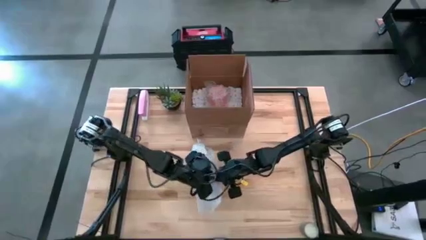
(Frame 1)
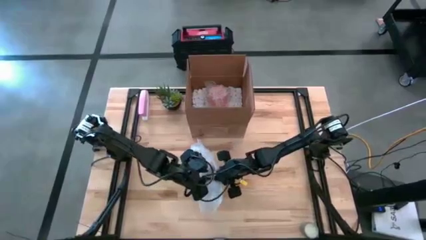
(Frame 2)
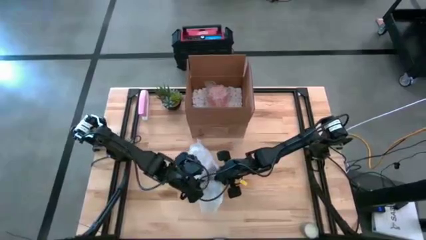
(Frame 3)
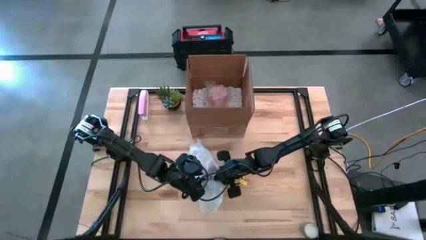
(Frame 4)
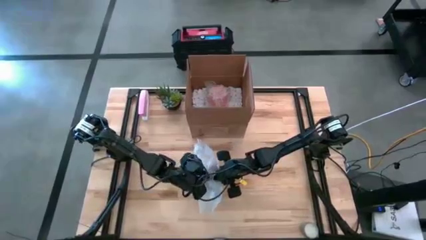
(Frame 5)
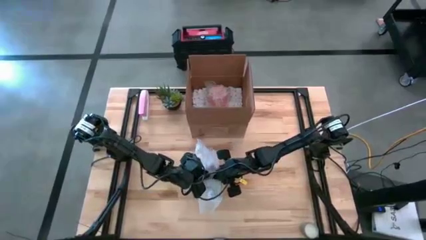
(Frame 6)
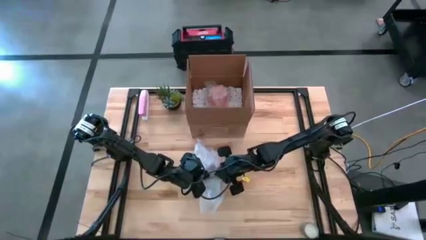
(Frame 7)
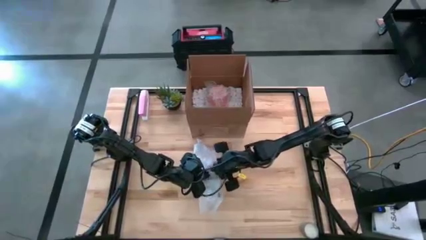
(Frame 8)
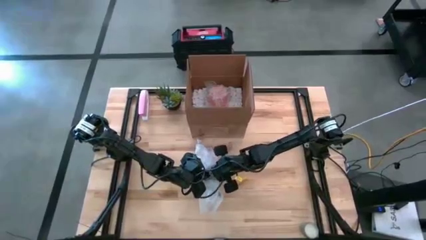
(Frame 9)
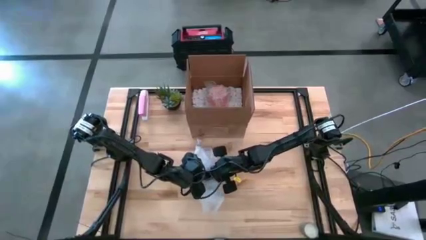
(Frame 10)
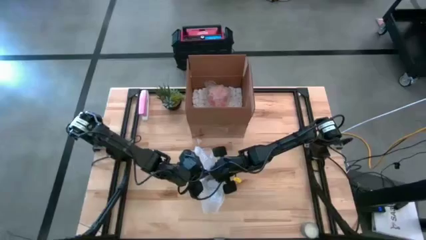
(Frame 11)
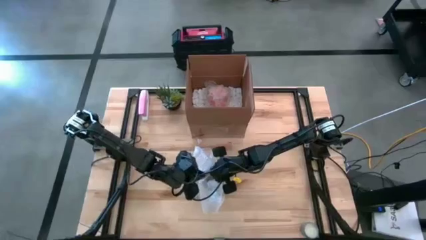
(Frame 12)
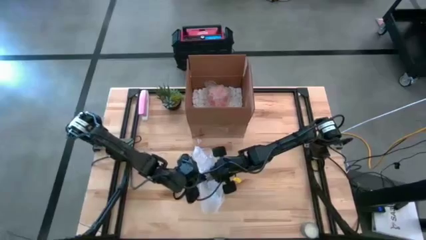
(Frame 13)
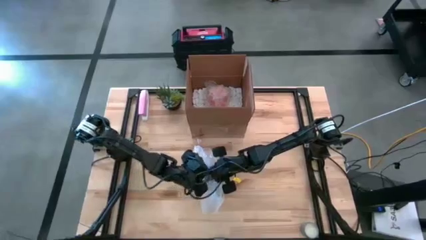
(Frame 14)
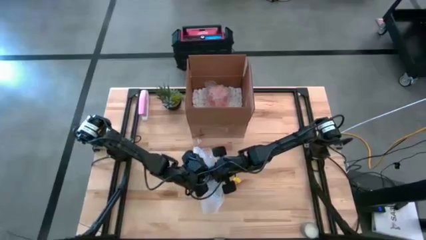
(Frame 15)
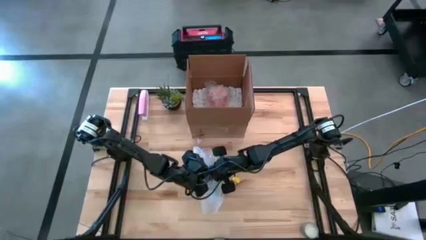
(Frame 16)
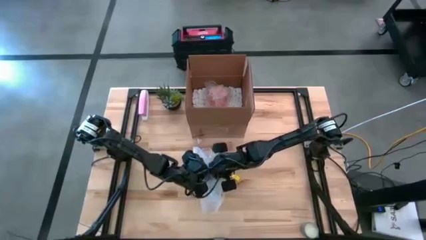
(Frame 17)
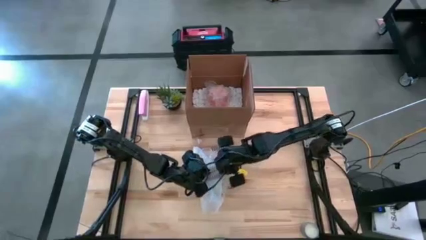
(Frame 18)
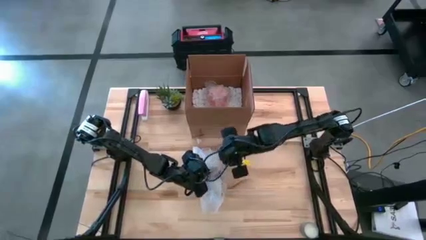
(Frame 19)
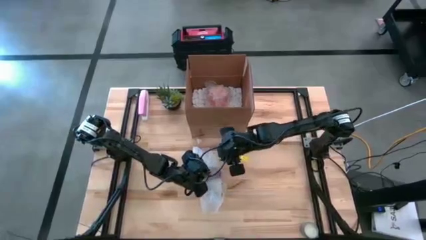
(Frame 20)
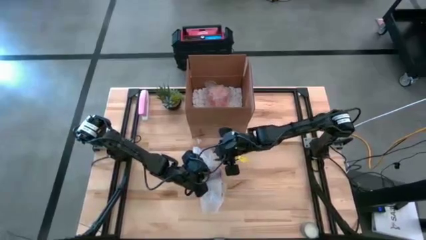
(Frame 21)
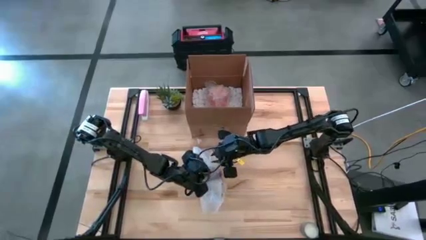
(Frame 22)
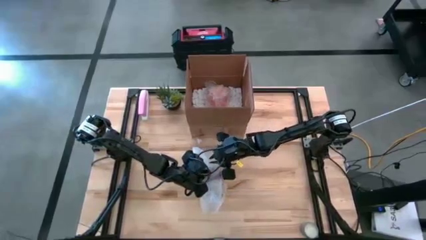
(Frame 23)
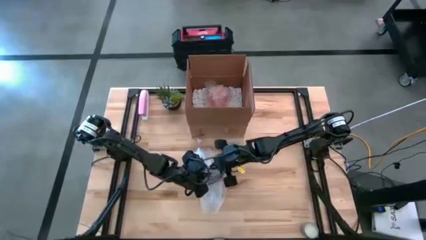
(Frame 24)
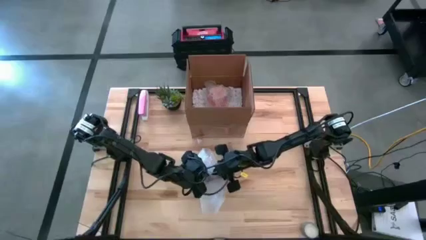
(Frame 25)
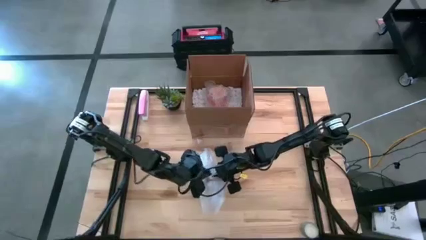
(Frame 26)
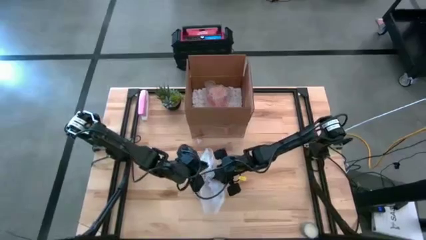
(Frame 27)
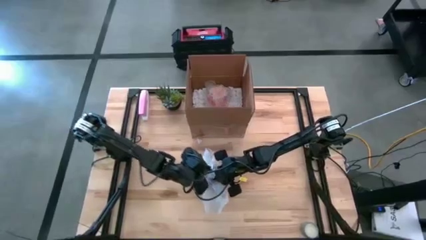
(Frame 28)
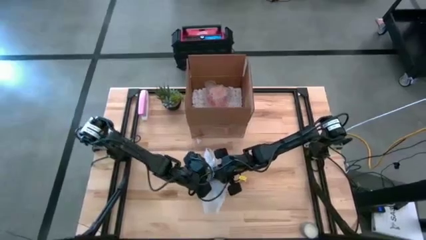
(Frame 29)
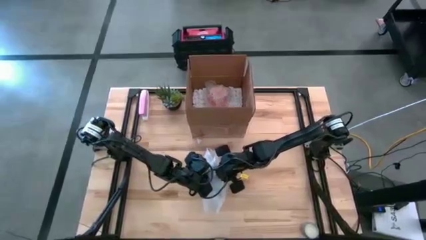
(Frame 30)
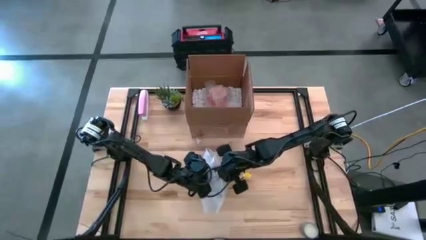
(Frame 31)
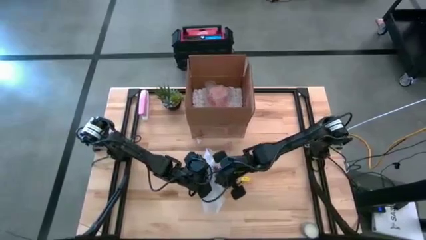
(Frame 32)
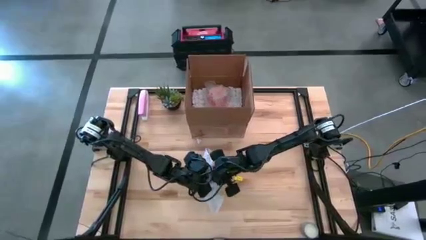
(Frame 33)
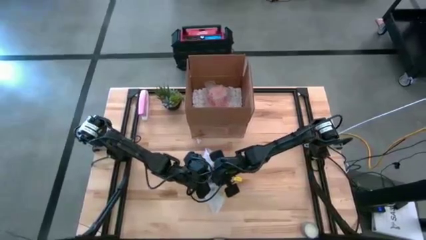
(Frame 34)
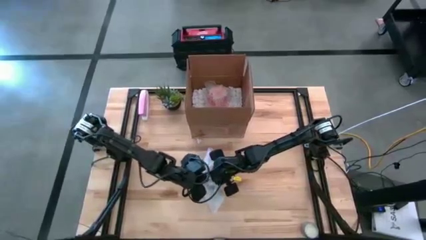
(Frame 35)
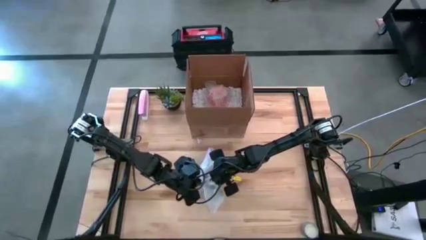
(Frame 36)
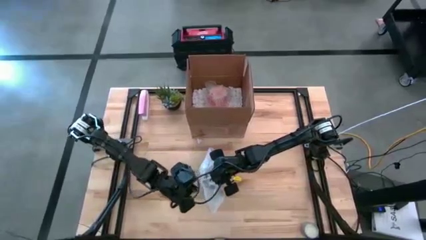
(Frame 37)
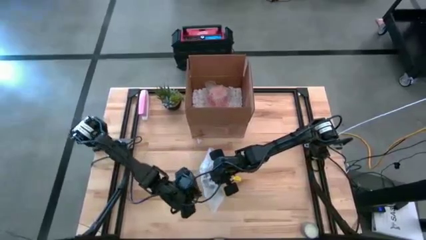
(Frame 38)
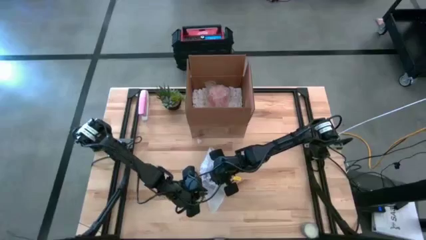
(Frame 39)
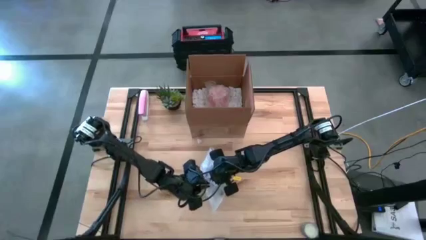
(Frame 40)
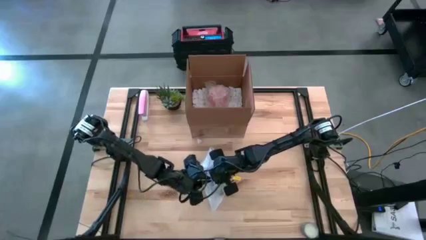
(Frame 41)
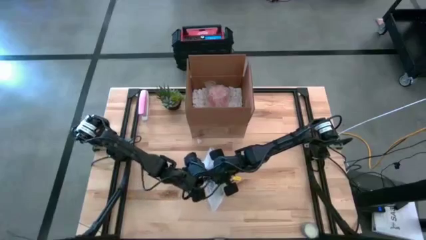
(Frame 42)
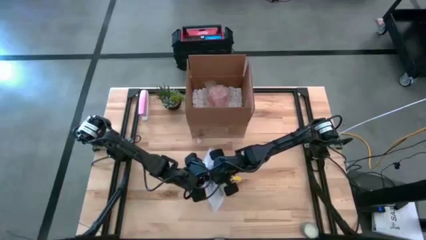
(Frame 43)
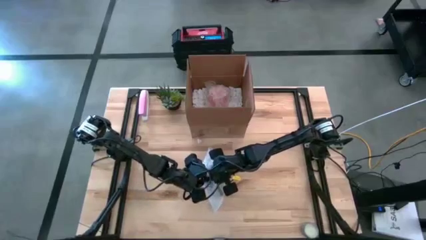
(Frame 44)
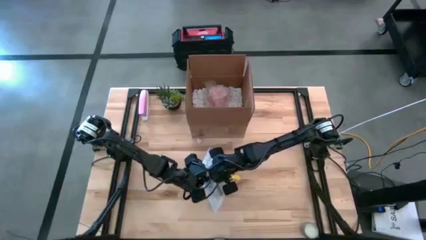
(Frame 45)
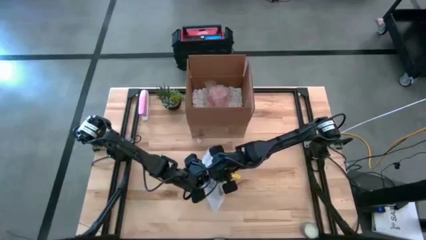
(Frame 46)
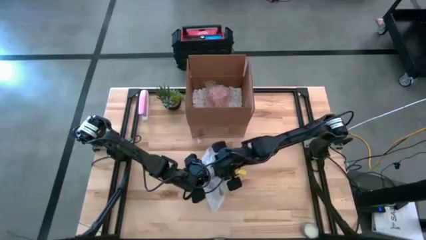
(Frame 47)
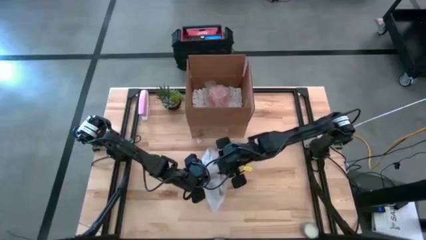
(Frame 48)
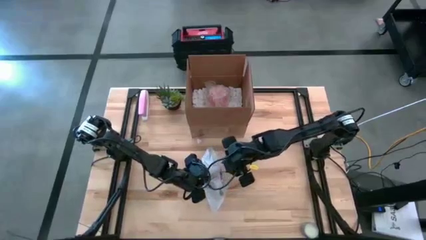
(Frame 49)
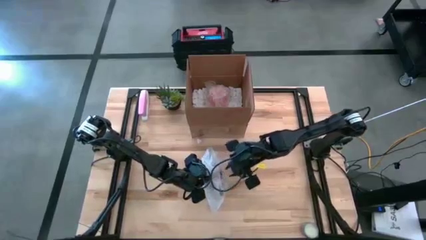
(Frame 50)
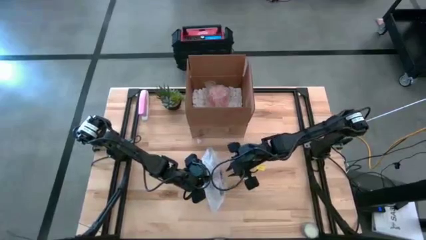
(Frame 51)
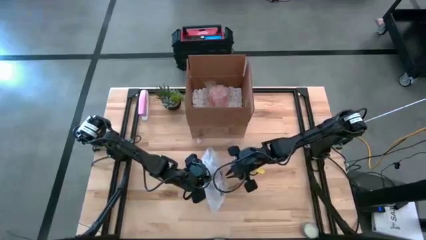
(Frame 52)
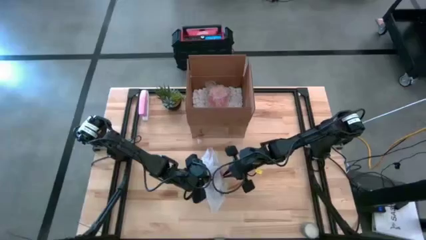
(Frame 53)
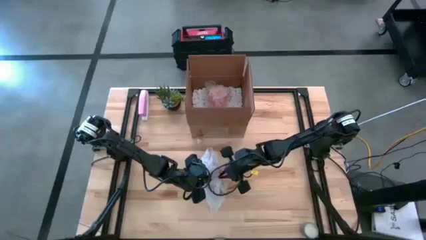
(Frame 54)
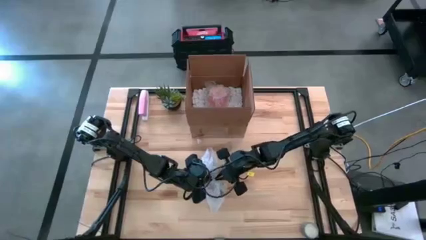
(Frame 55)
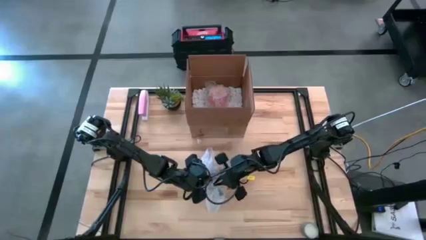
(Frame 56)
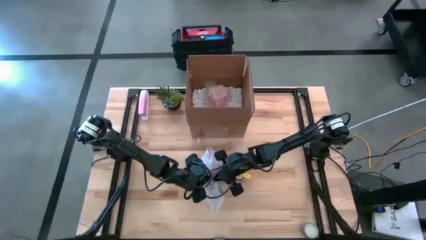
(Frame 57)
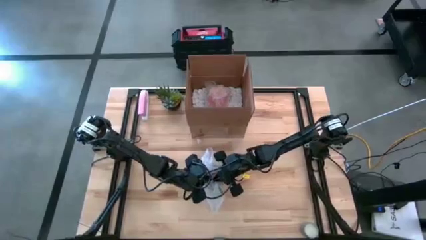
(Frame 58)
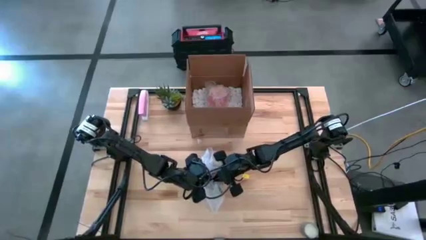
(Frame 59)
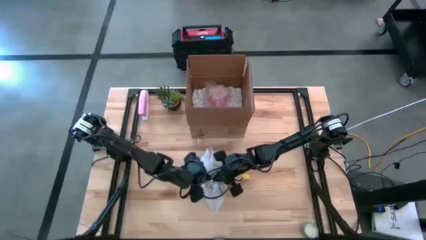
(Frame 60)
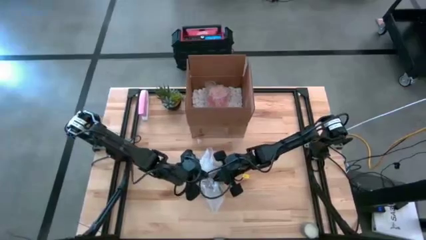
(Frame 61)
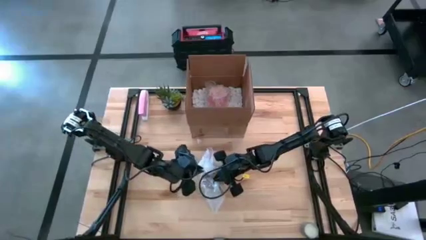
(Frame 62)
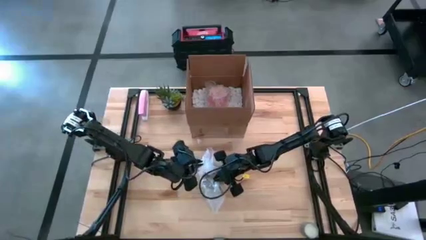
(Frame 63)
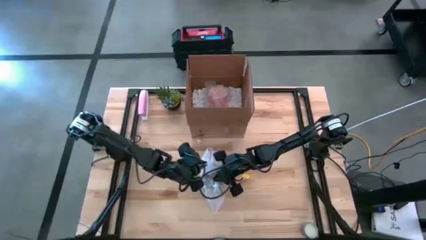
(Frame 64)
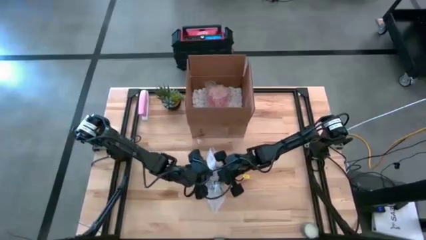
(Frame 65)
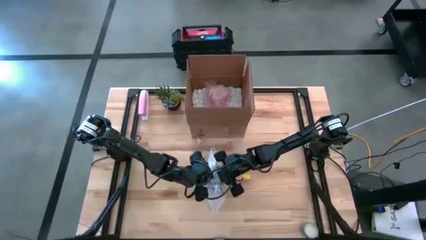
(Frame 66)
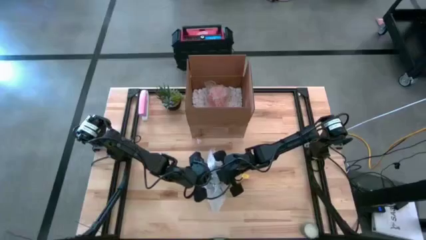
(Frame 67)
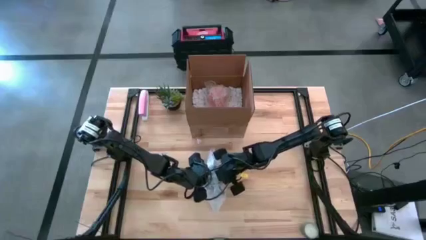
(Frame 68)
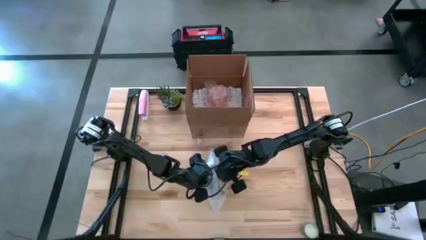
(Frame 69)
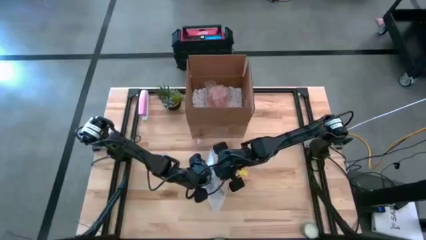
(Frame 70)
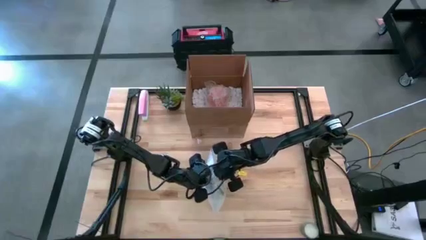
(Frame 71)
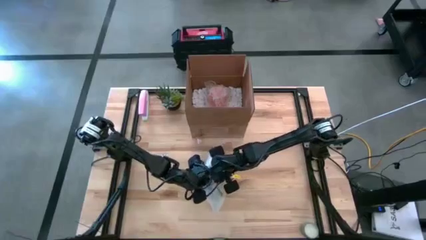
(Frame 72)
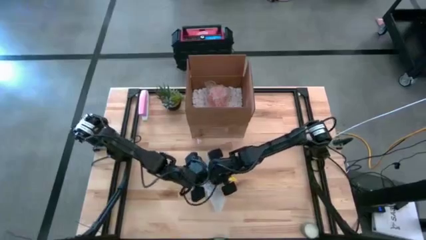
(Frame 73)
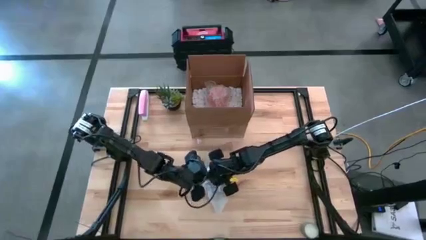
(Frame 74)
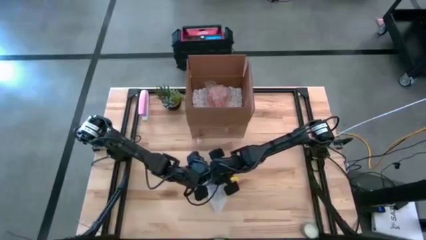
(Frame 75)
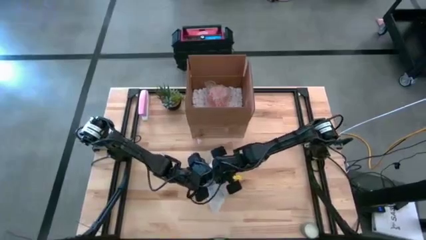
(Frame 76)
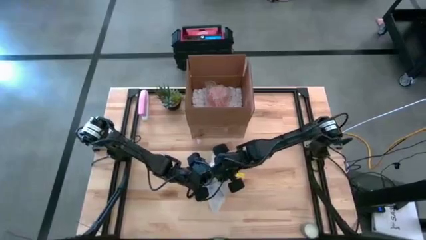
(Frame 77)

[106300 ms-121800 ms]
Task: wrap mug
Wrap the black mug with the bubble wrap
